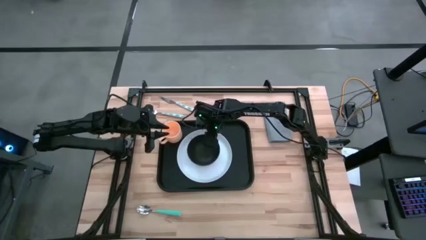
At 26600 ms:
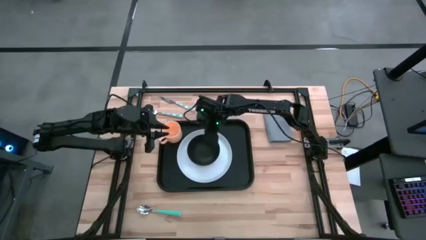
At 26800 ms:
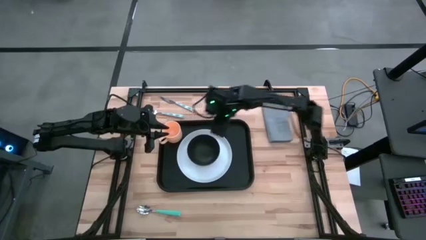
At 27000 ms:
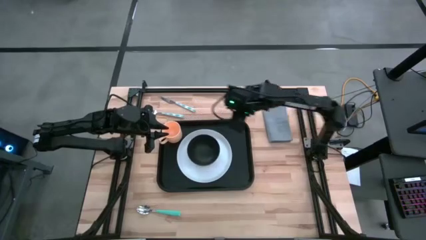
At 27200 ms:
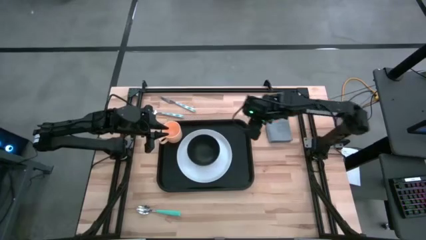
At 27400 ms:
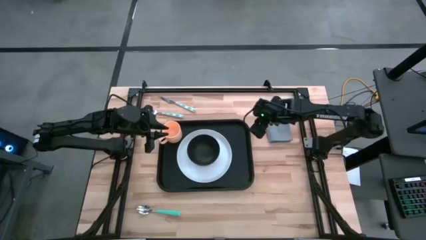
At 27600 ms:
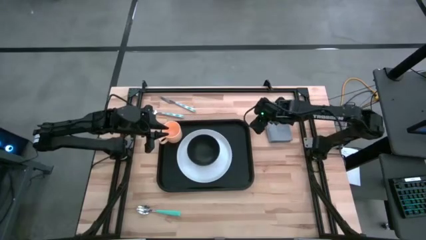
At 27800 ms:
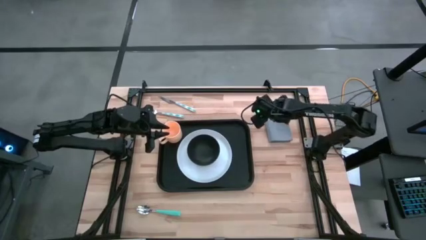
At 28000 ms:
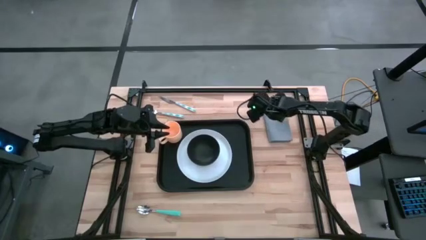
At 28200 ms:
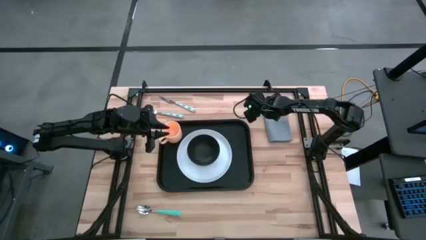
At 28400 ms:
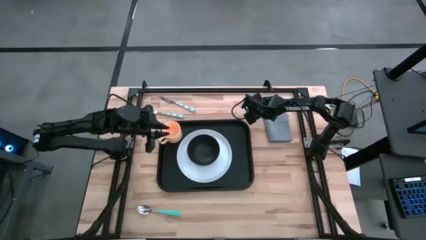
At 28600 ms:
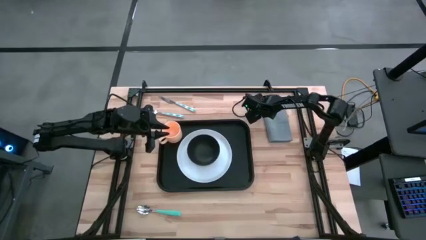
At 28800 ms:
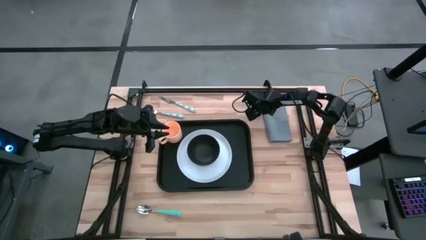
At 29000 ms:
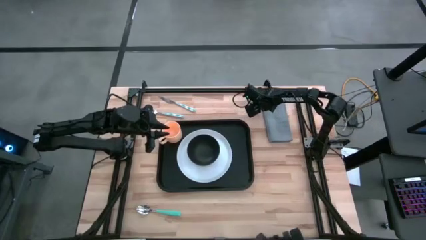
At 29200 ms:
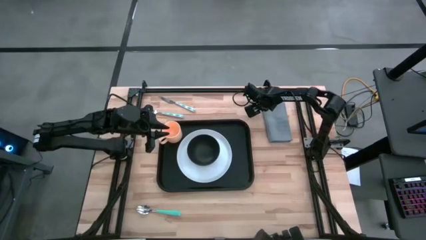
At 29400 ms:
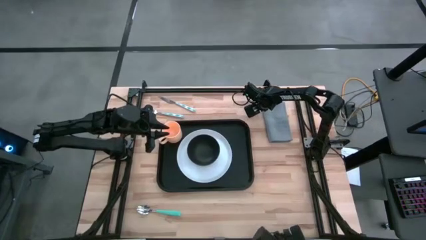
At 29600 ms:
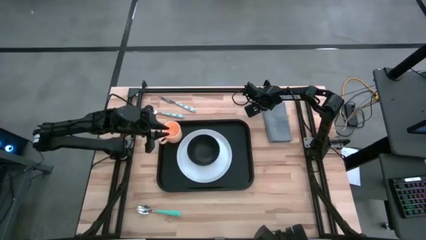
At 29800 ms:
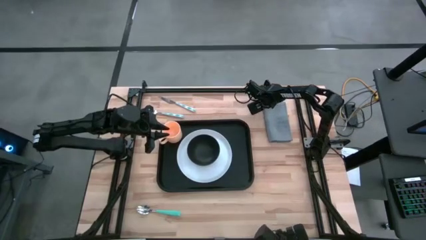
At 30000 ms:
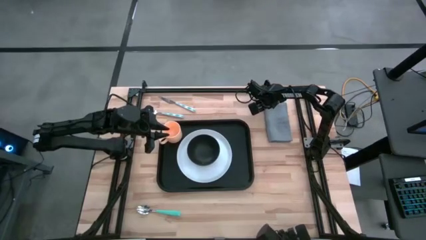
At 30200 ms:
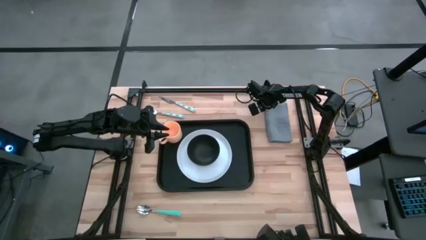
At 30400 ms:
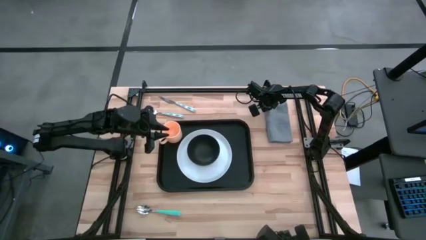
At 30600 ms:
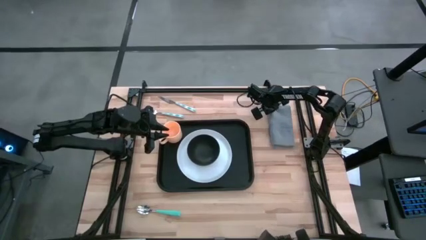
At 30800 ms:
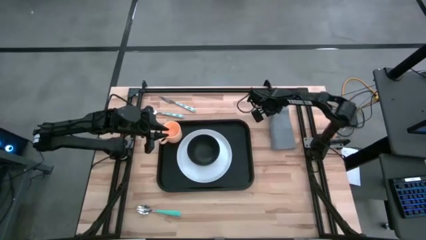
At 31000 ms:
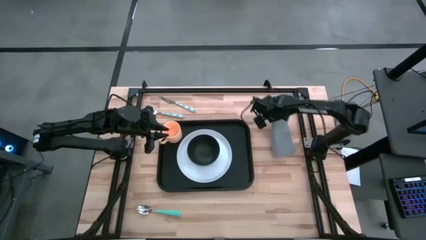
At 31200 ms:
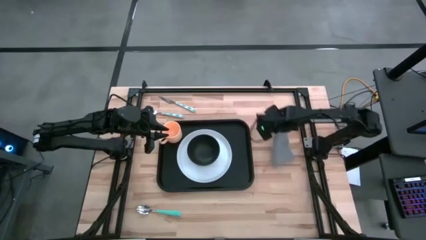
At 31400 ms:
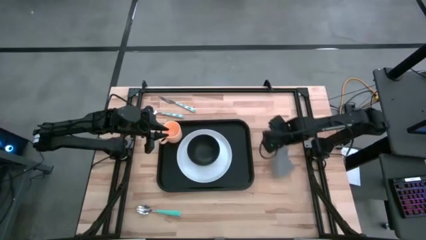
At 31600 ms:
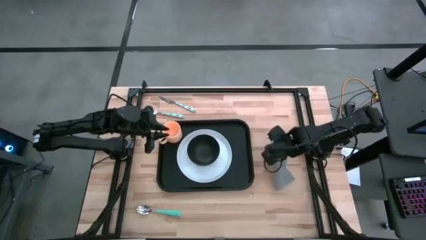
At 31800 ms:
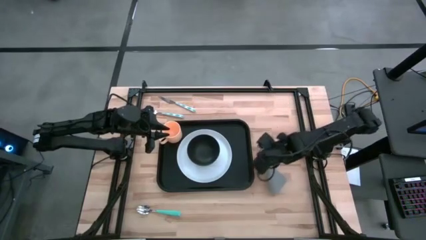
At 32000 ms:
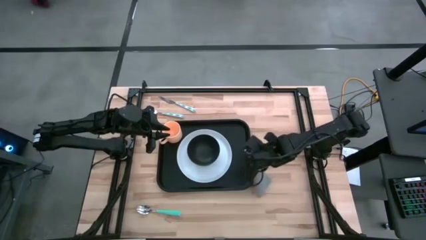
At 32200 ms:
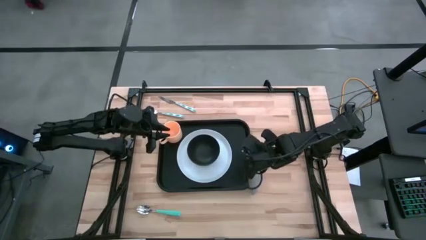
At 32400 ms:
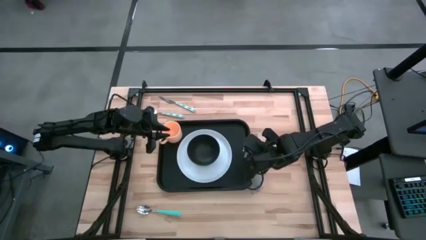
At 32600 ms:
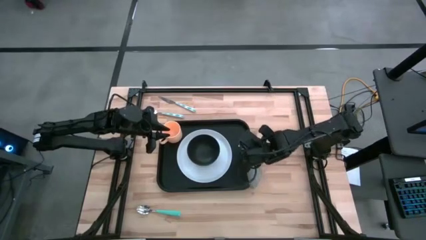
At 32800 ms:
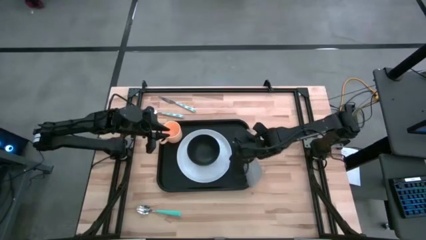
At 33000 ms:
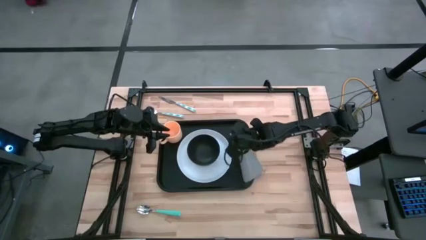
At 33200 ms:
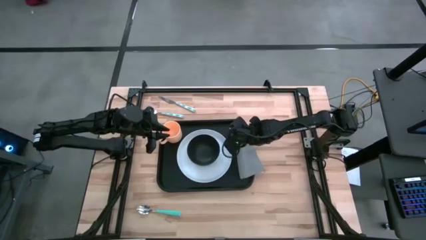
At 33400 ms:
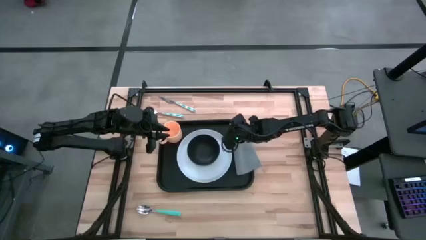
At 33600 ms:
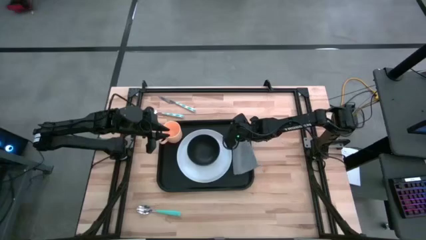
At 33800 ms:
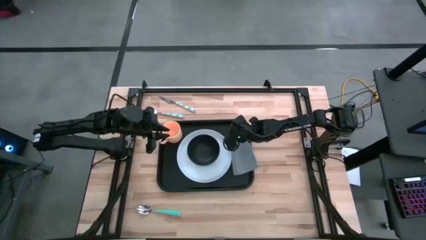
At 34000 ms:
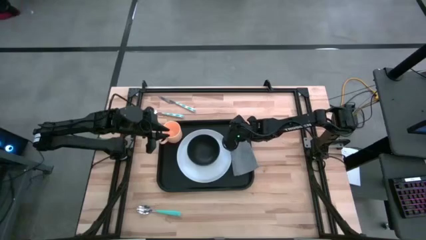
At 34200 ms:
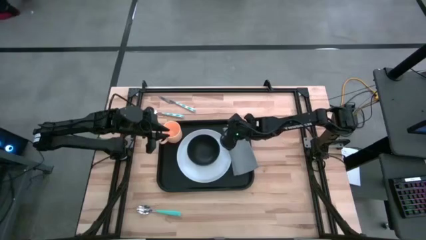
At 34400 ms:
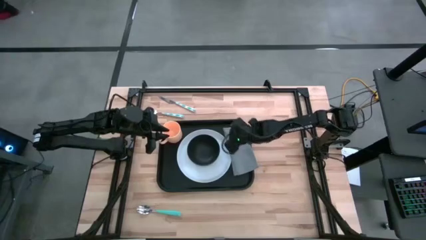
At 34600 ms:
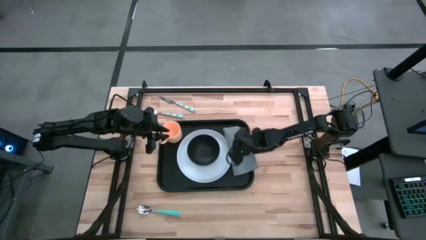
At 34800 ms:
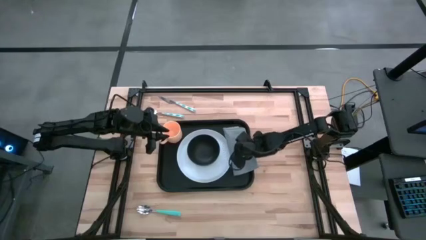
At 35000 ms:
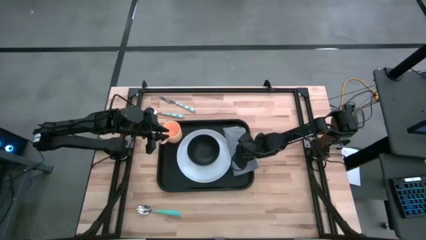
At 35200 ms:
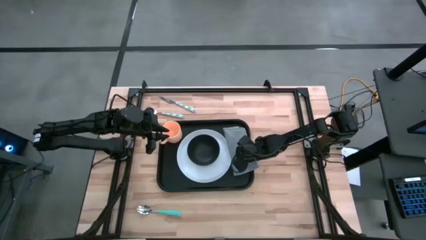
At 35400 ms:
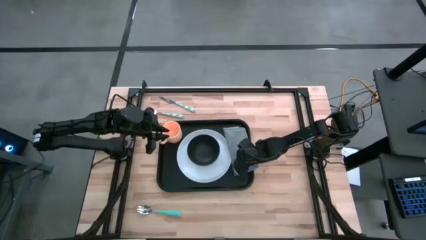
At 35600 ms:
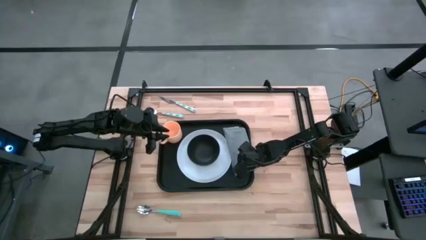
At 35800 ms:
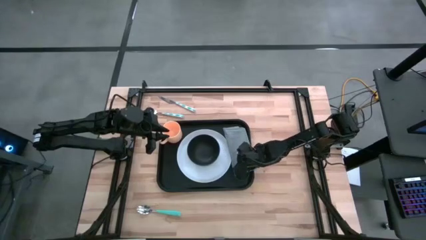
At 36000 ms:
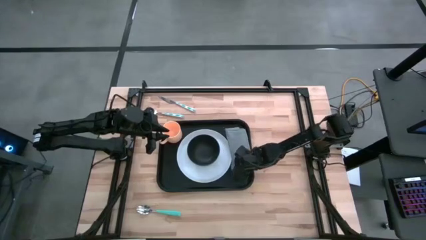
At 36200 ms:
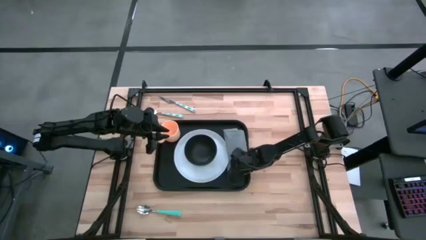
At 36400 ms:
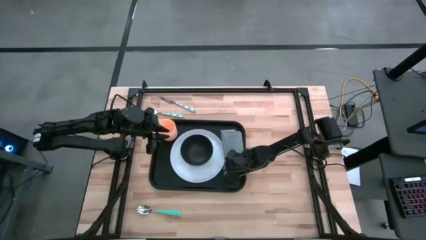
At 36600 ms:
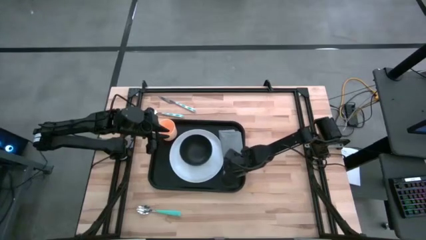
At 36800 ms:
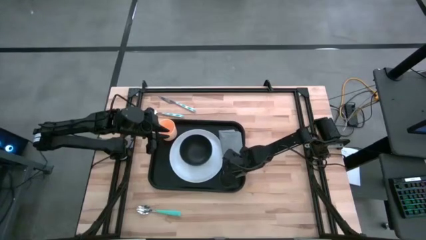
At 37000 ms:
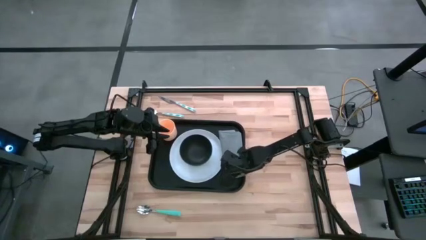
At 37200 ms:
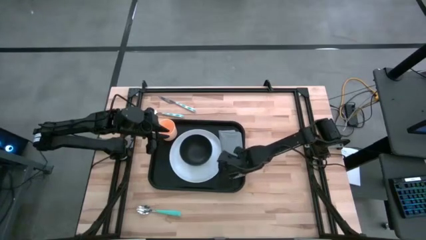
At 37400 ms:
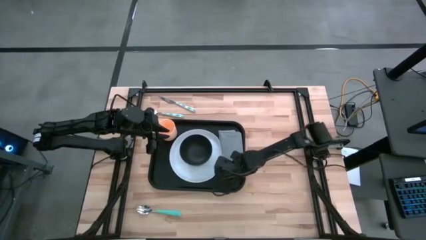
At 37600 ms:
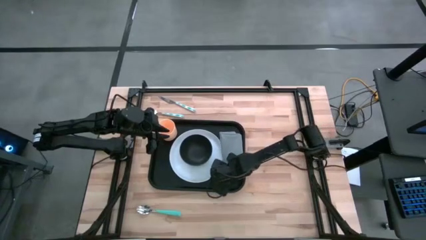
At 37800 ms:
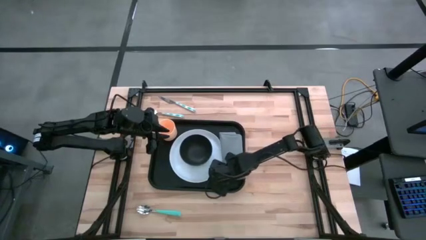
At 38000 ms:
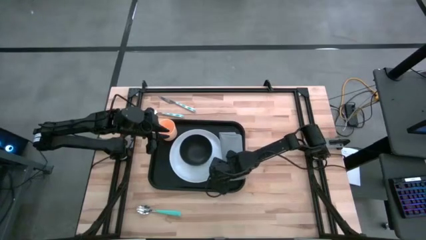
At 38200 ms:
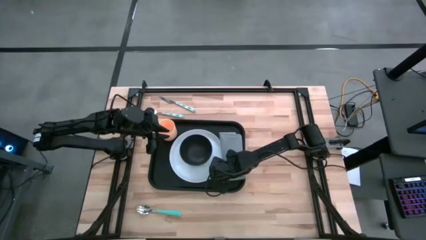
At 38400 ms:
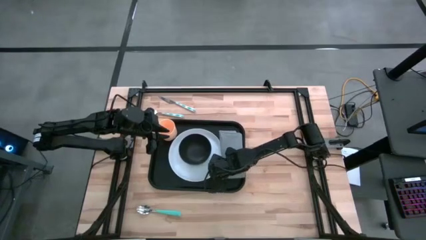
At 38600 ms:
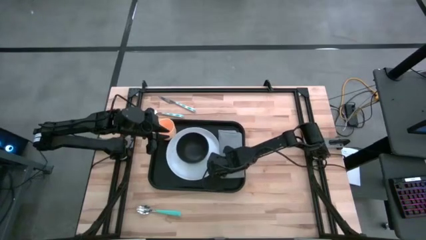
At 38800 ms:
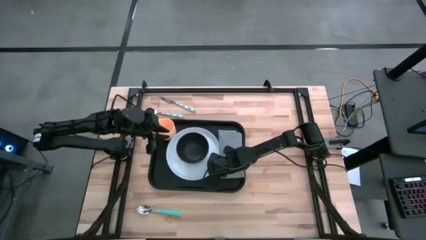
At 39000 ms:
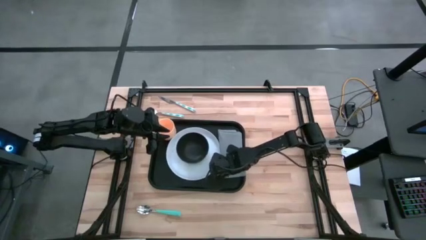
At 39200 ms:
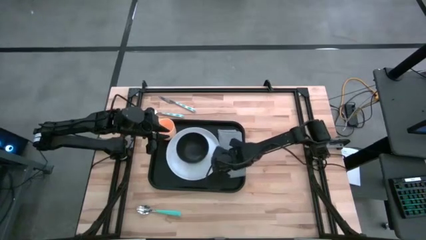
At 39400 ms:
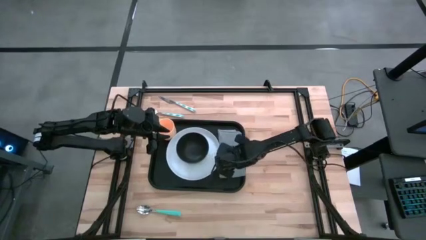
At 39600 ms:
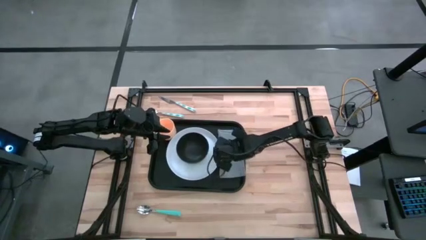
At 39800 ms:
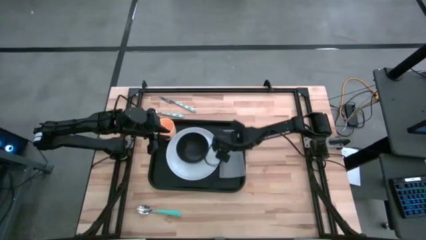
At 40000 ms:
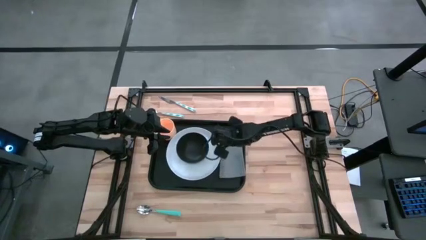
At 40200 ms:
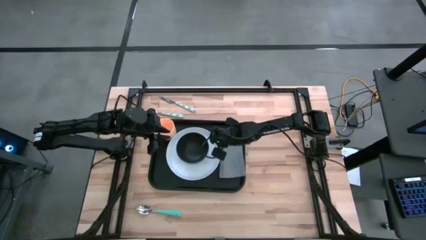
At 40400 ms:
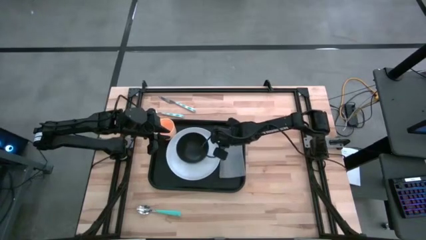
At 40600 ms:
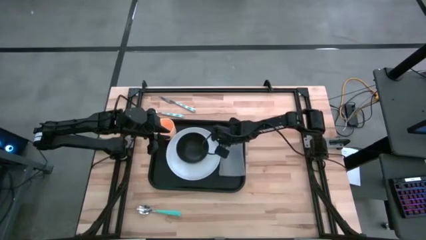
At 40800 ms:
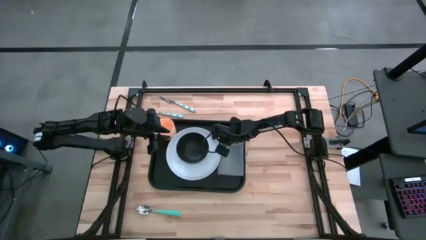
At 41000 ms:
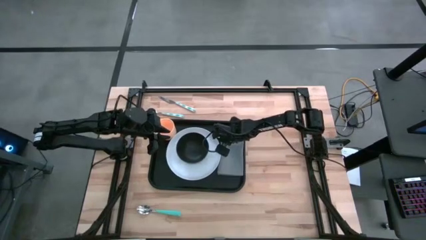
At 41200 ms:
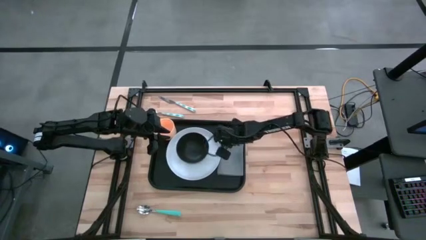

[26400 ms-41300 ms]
Task: Set up tray
Put the gray napkin on the black serving tray

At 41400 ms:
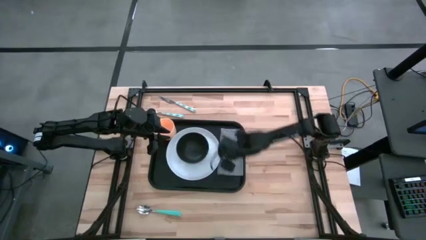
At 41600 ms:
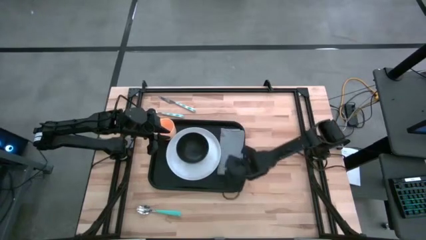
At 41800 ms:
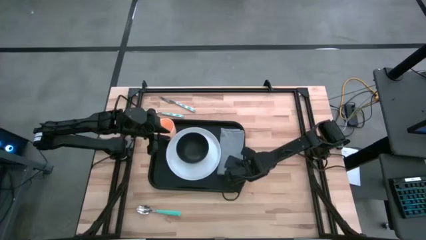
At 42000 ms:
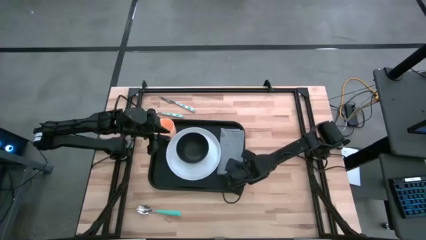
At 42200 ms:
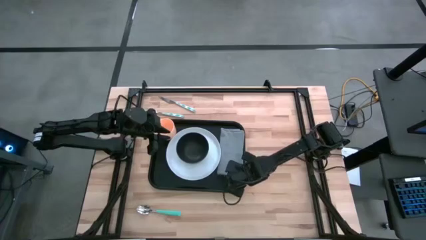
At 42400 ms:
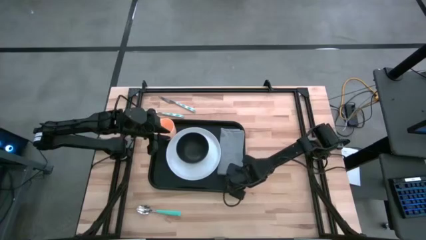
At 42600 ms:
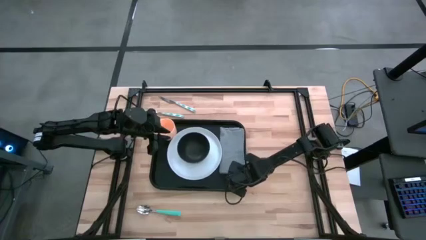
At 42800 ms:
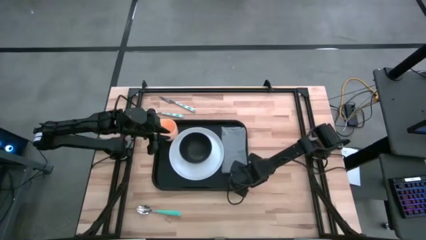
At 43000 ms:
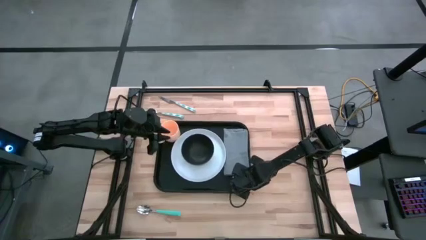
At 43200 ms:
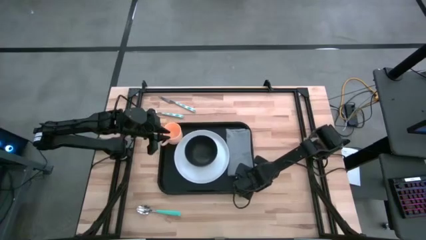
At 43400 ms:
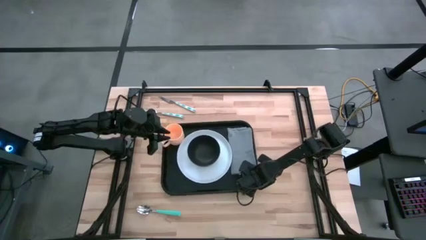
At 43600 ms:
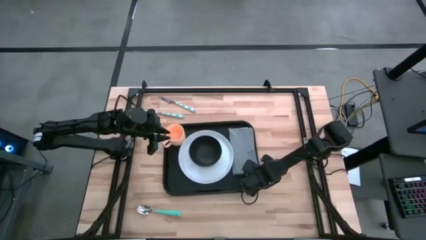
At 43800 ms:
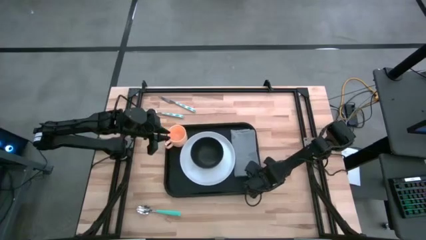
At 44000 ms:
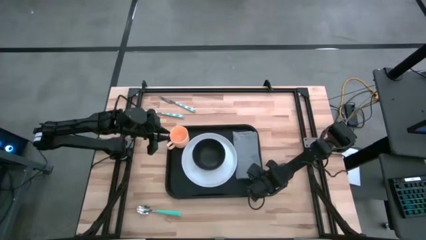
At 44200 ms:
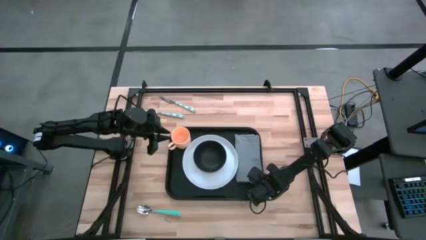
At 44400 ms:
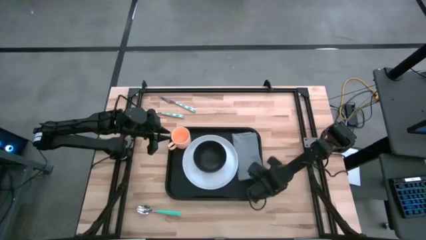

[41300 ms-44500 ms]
Adjust the black serving tray
